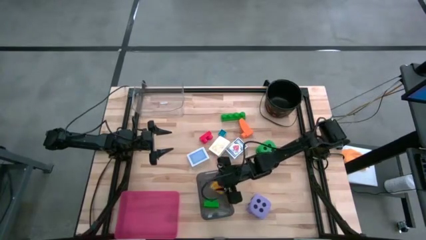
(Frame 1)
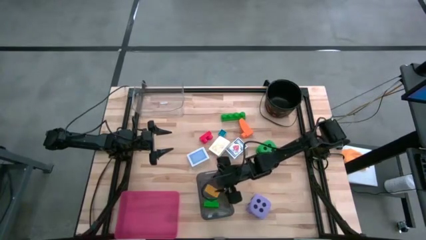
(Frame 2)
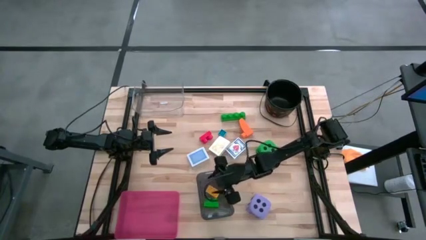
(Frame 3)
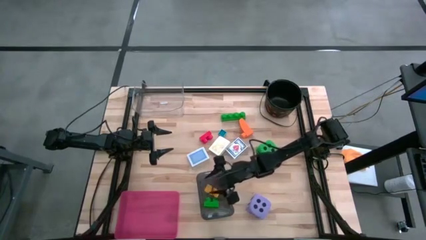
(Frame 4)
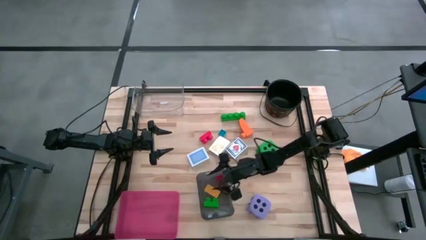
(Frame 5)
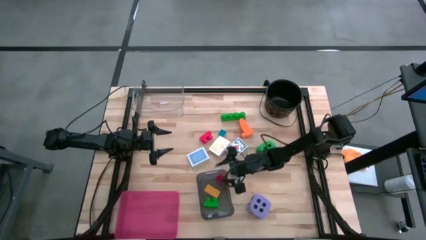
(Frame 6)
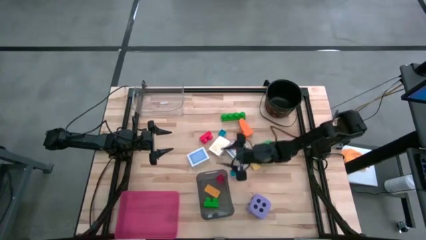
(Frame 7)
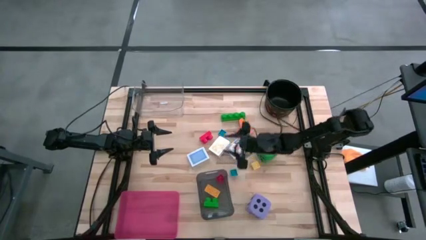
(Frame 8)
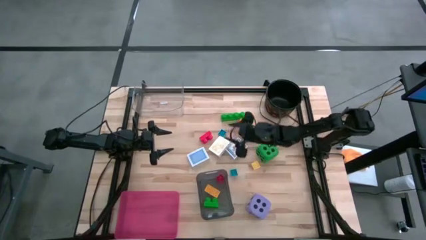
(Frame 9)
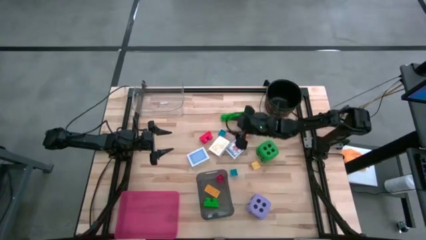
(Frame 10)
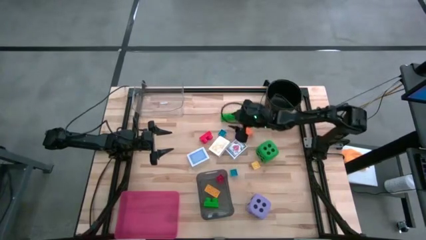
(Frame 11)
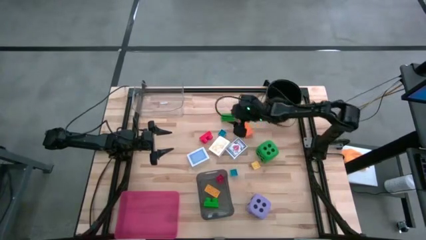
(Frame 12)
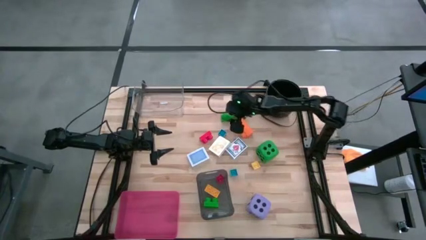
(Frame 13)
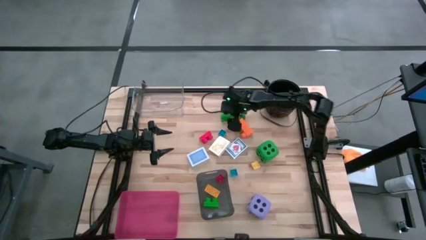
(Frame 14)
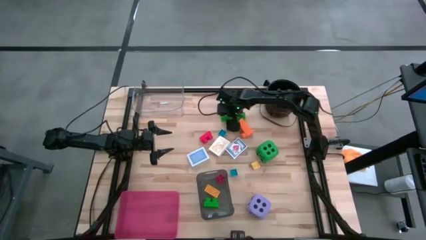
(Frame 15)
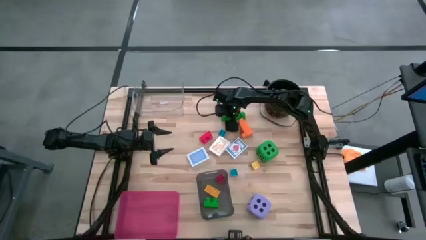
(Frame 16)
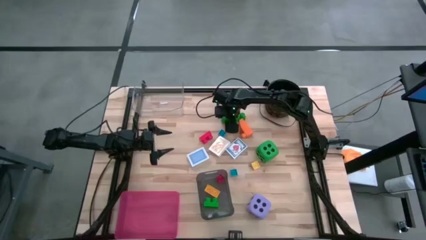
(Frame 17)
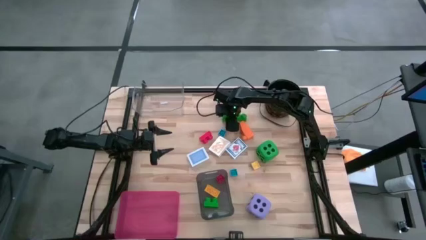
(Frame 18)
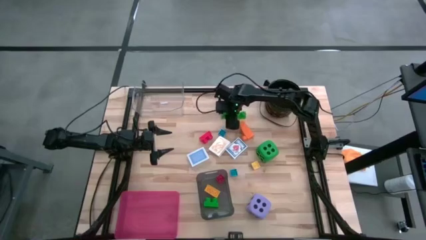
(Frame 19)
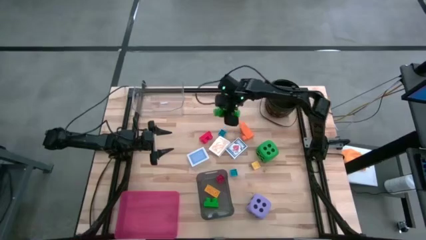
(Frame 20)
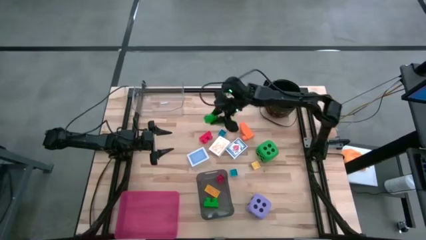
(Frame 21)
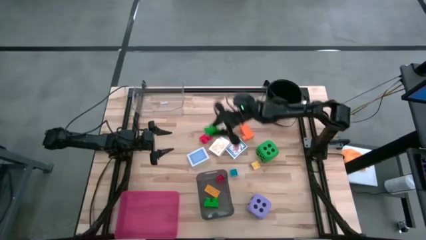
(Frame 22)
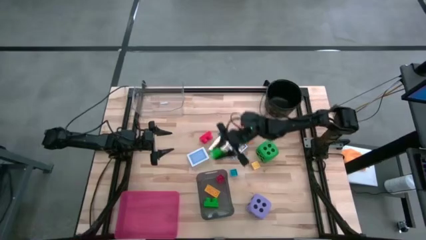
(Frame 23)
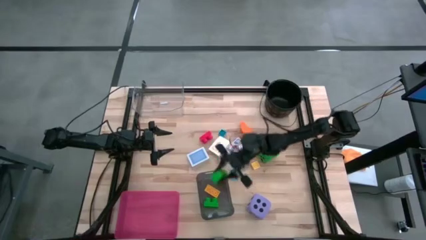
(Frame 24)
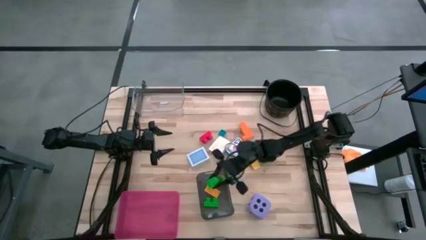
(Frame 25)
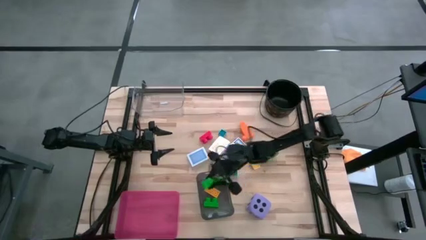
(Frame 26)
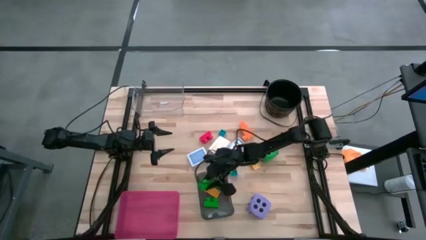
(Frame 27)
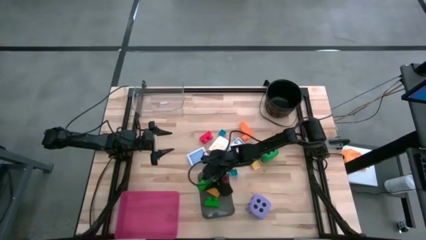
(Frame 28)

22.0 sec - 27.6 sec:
Task: Pick & Place Toys
Put the green game piece into the black bin

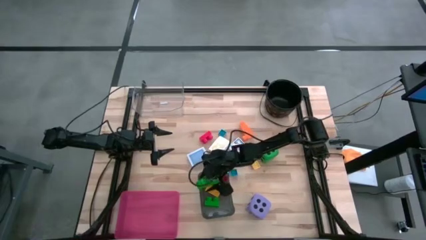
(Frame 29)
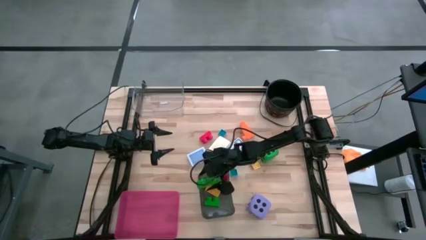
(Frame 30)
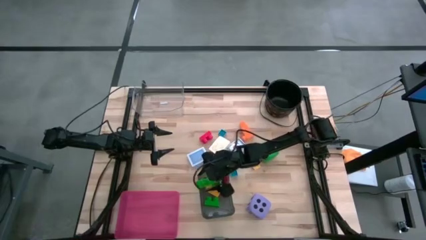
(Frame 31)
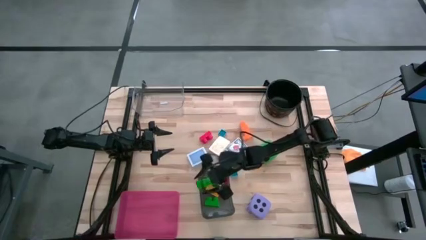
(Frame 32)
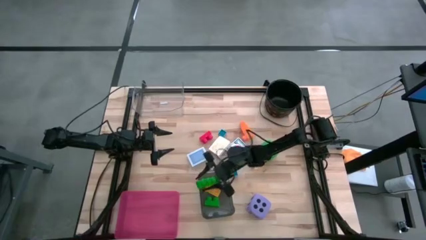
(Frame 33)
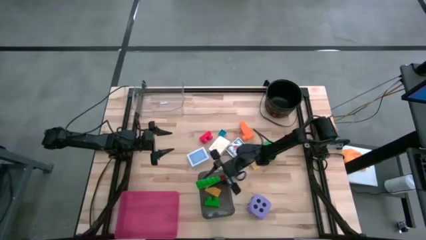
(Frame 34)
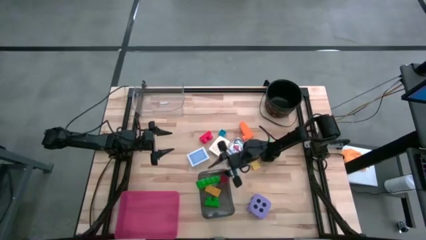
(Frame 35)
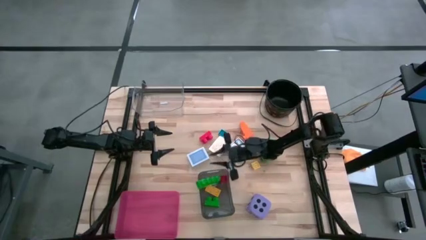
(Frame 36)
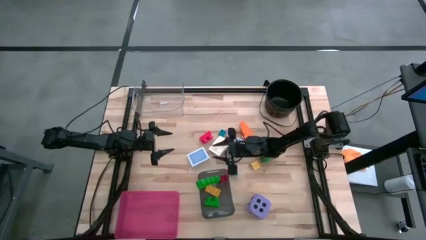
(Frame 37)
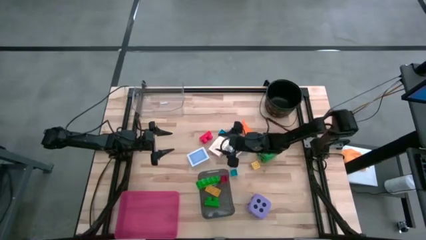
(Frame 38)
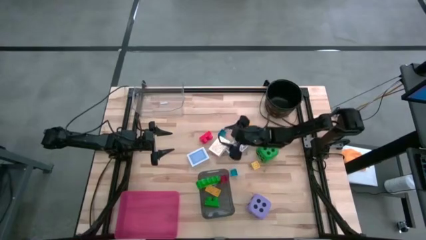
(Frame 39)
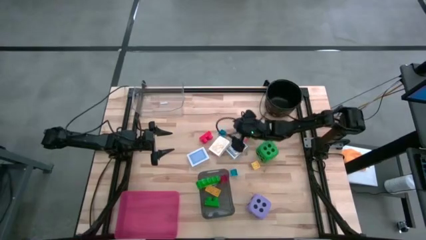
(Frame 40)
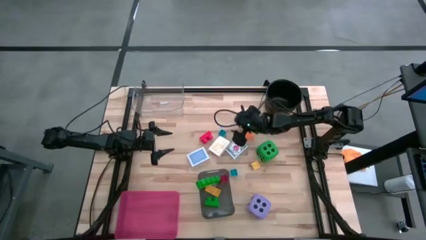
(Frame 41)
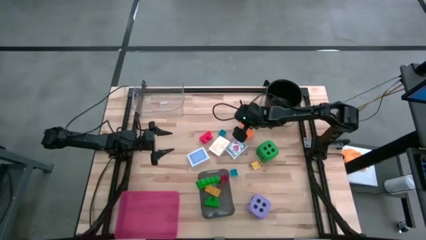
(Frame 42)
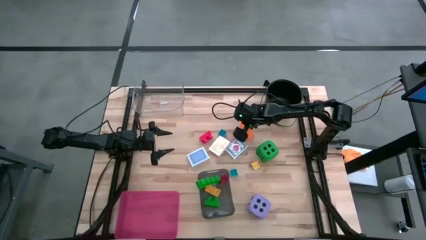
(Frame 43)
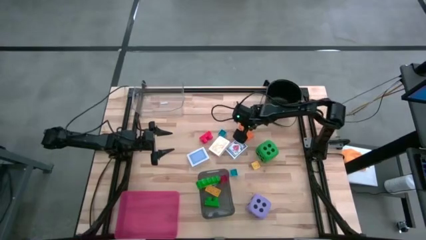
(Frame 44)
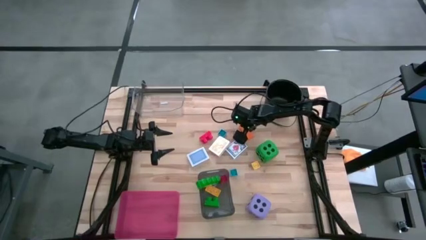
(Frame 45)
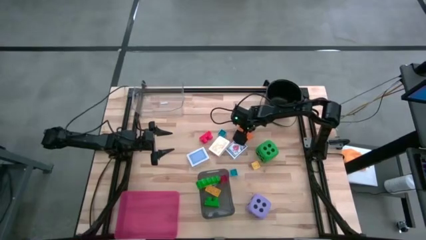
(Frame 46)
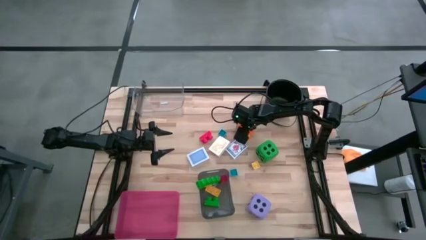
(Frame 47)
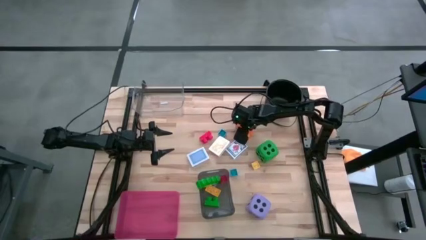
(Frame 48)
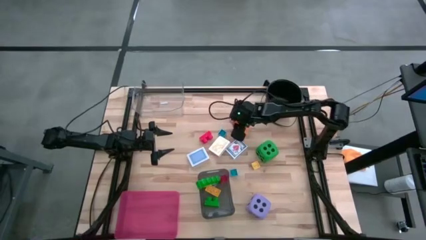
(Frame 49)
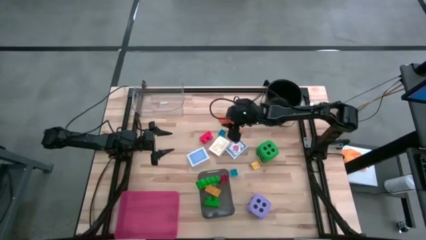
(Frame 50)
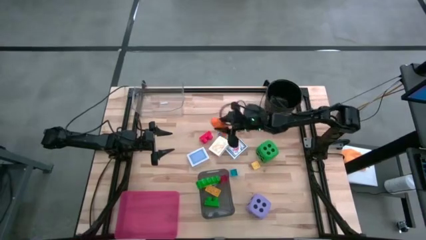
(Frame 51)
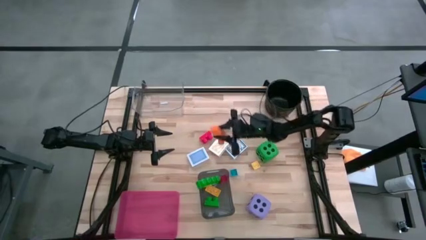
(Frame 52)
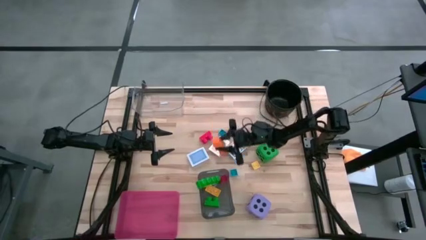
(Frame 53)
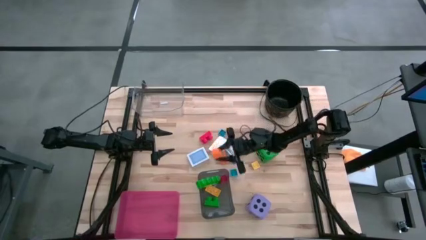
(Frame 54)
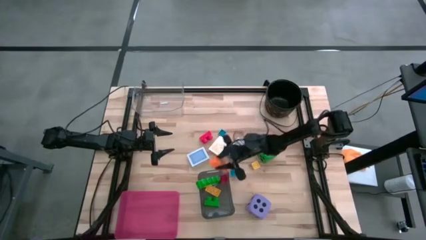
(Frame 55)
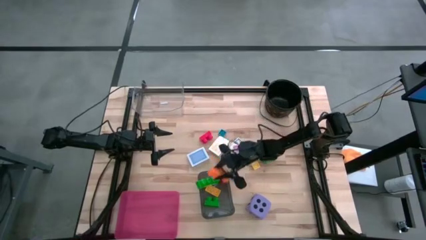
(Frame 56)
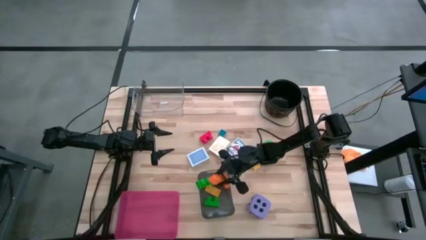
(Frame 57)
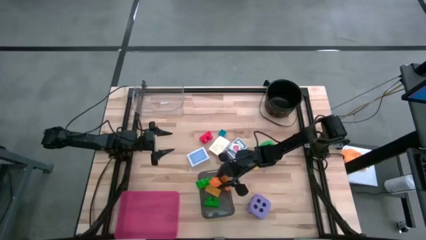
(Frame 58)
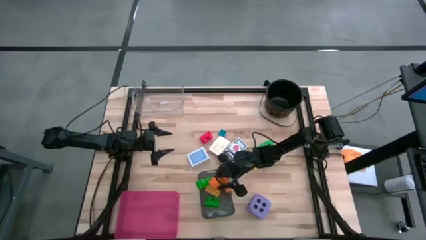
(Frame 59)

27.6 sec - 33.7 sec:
Put the orange game piece into the black bin

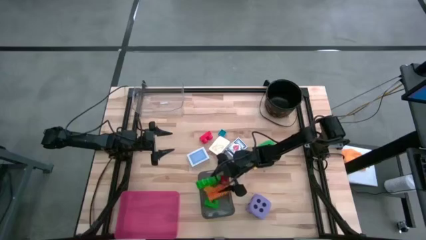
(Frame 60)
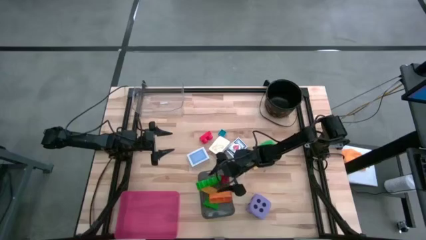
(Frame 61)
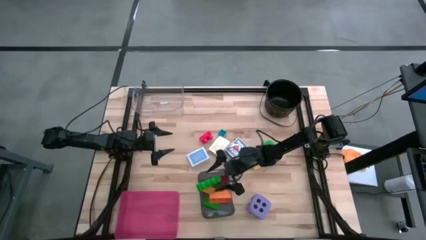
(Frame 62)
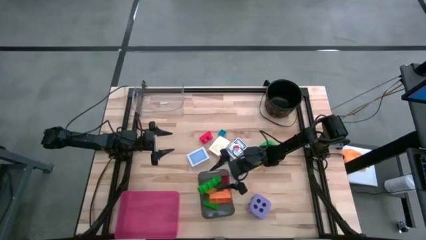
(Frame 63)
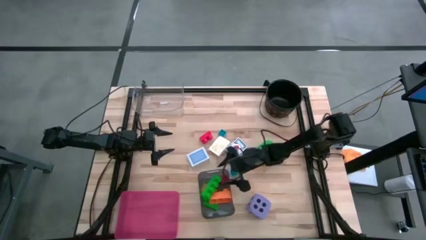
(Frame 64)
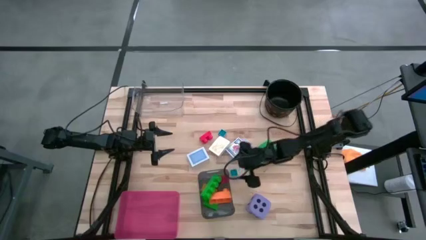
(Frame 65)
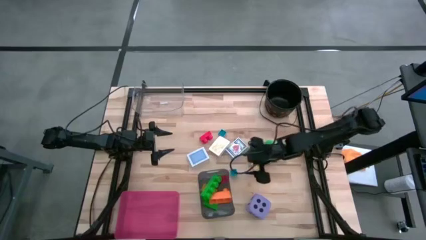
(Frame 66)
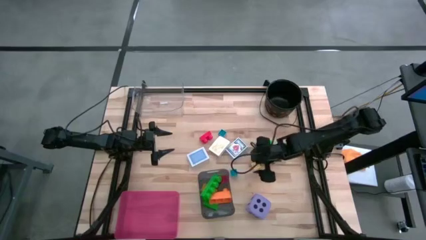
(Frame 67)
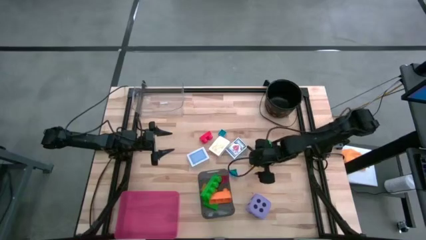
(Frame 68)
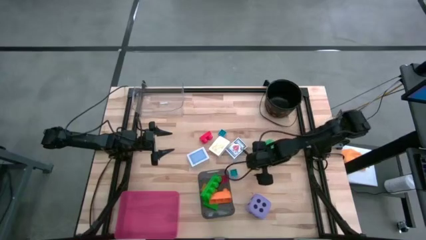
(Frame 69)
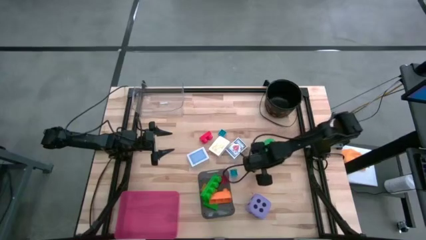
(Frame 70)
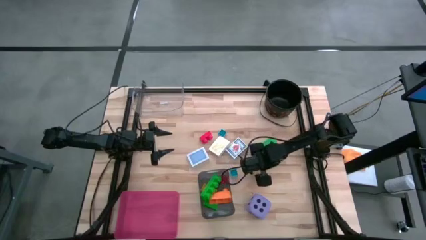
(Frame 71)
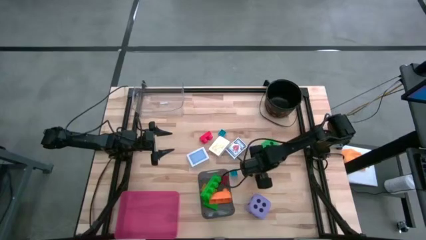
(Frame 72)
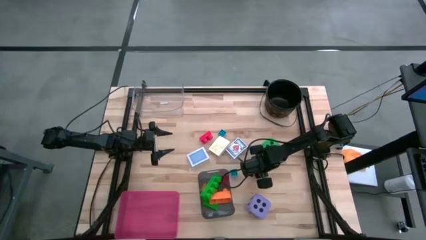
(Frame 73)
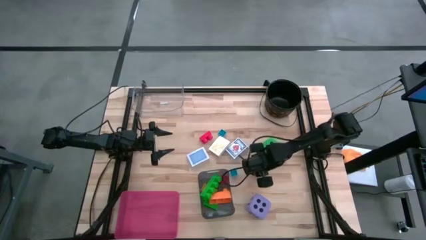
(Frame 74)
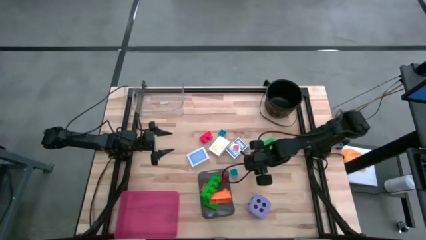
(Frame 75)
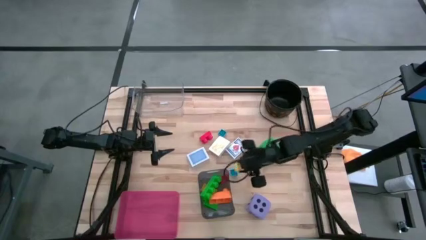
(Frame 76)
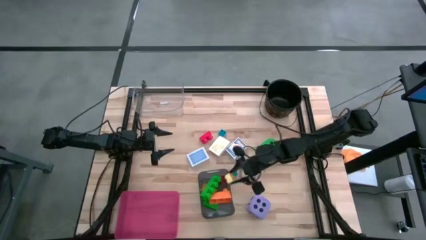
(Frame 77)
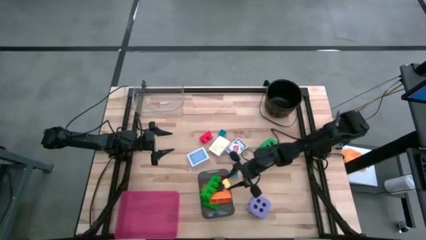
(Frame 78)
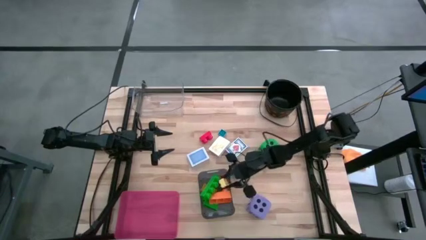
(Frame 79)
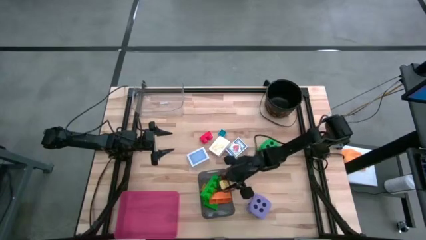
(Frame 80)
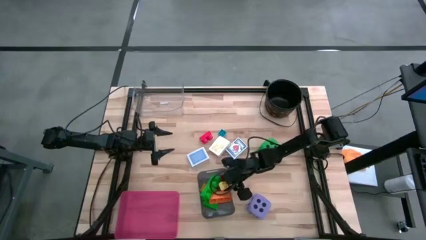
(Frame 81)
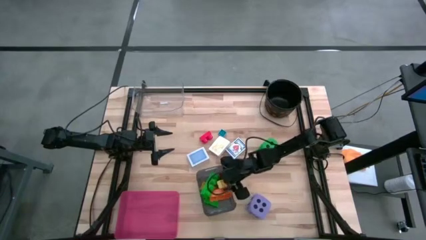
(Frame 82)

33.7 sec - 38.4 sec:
Put the yellow game piece into the black bin
